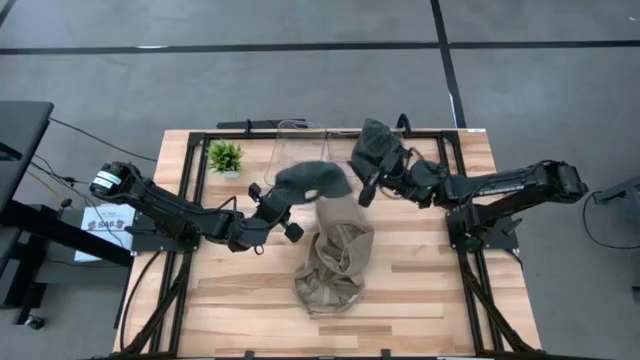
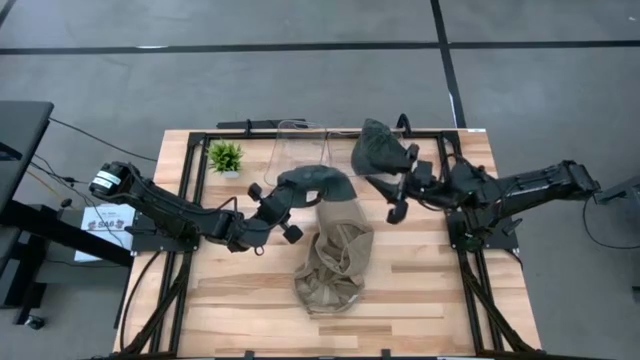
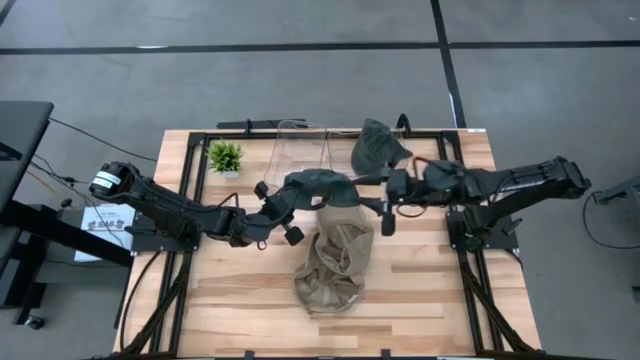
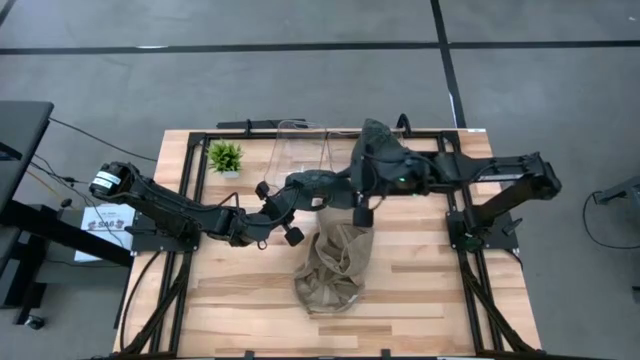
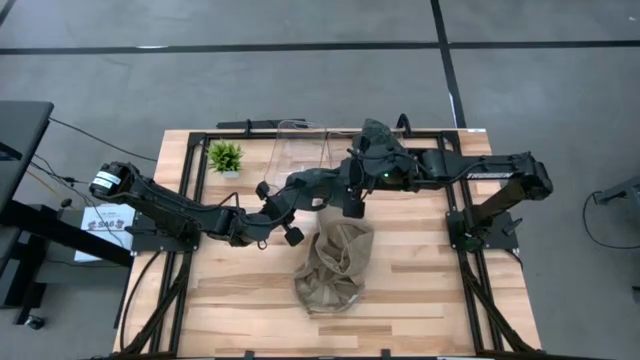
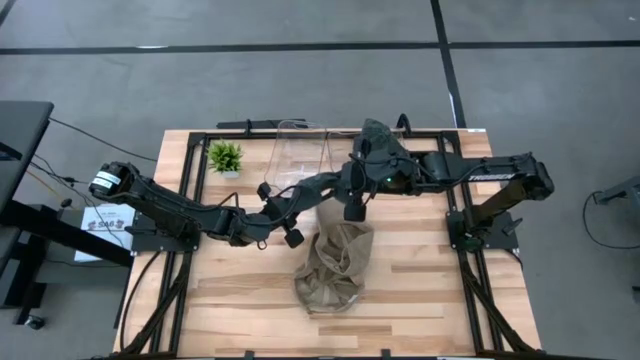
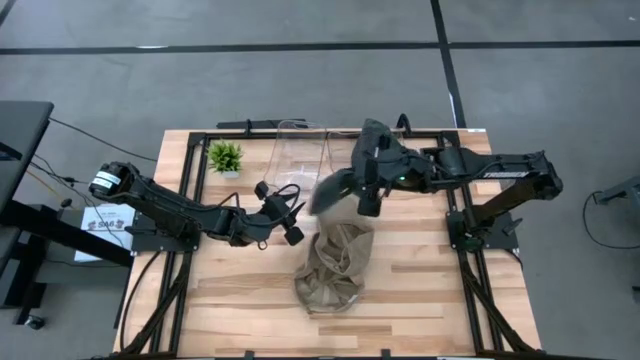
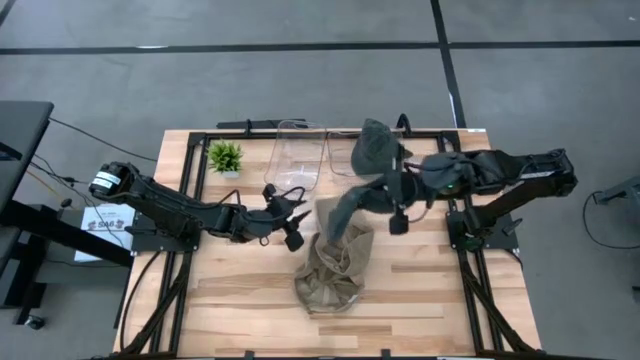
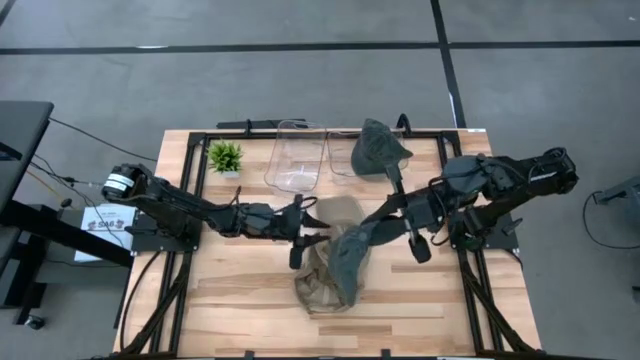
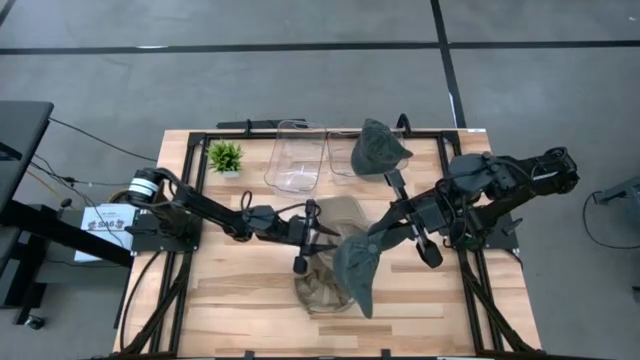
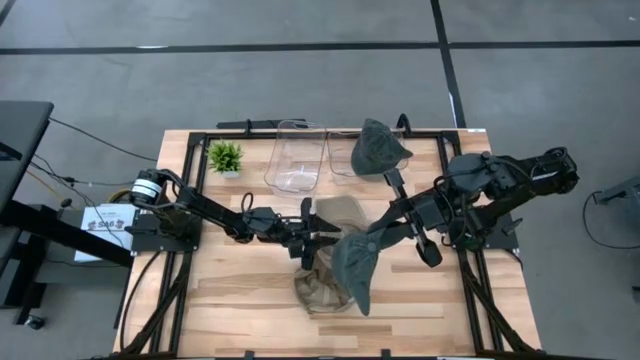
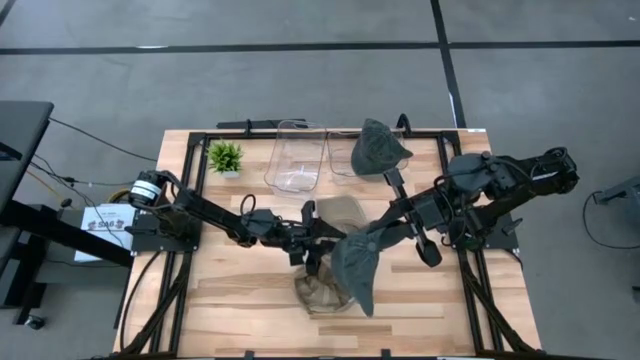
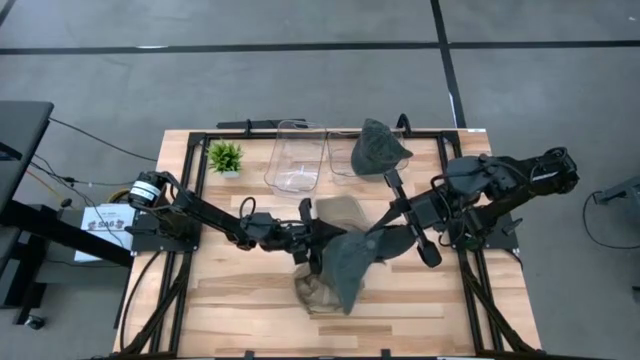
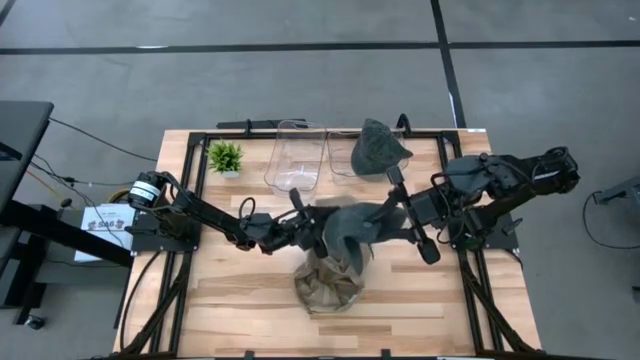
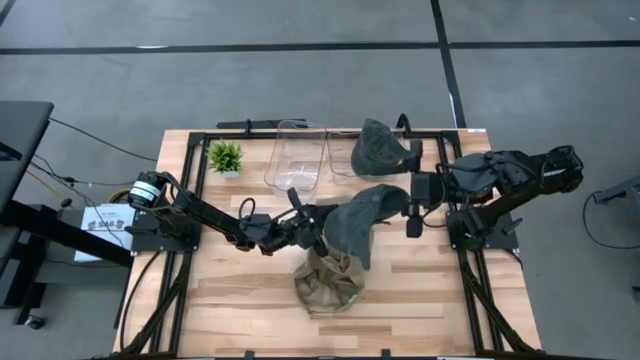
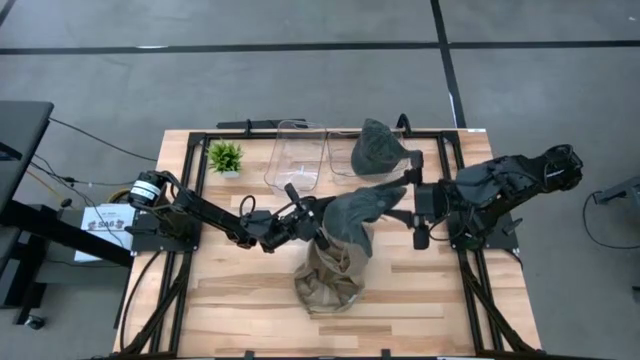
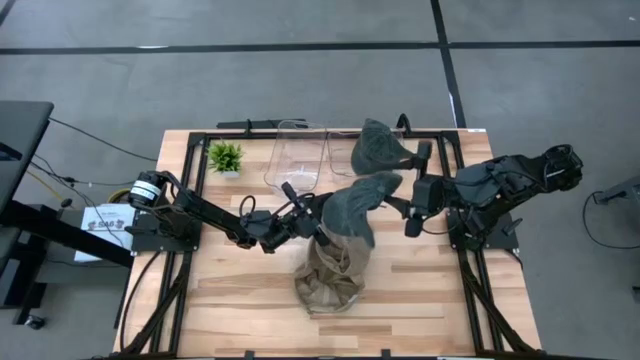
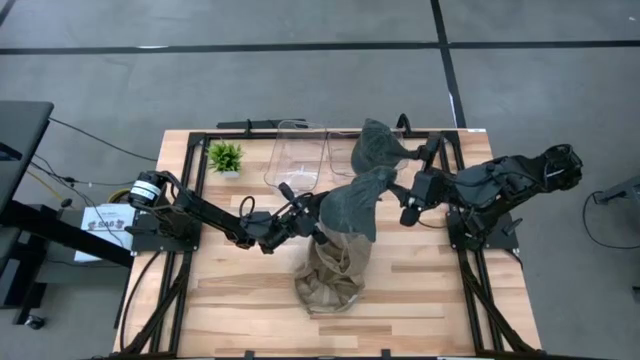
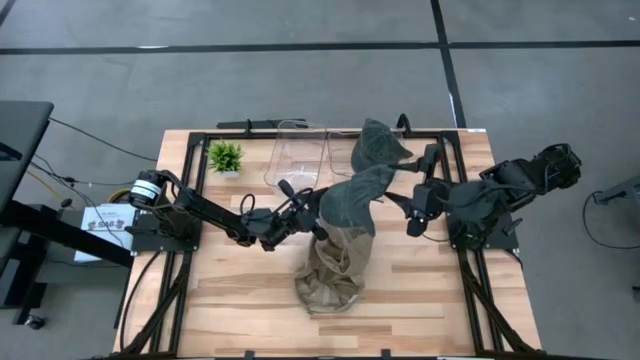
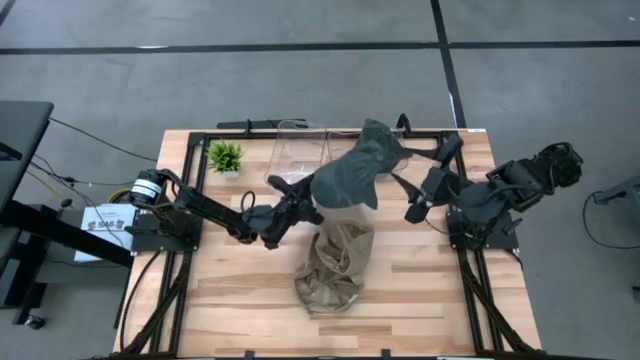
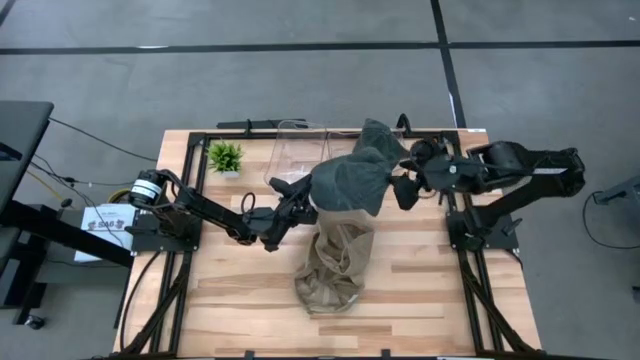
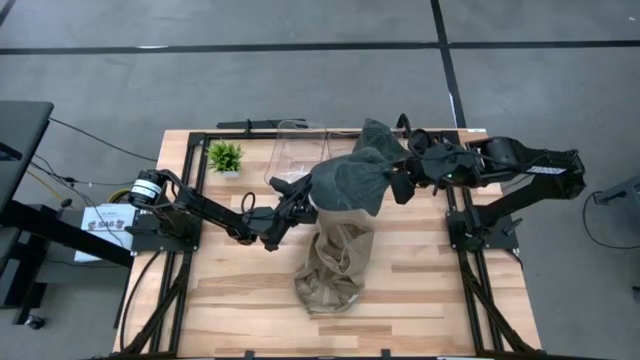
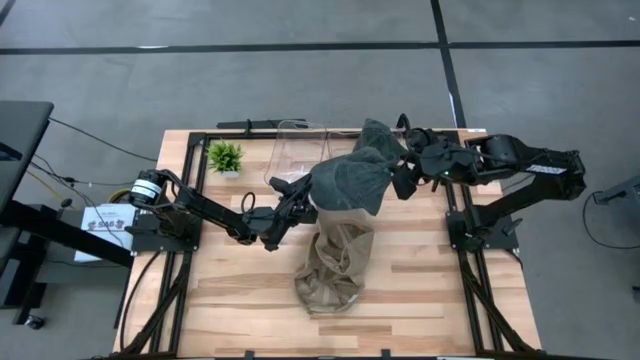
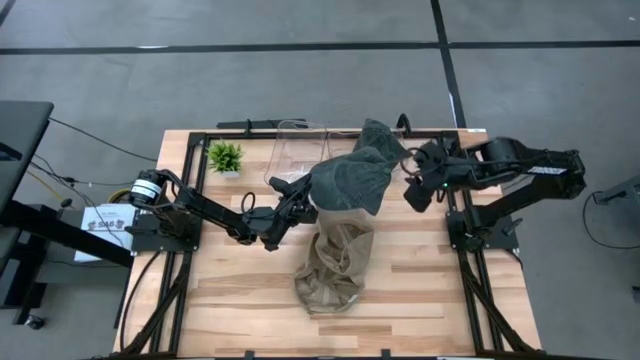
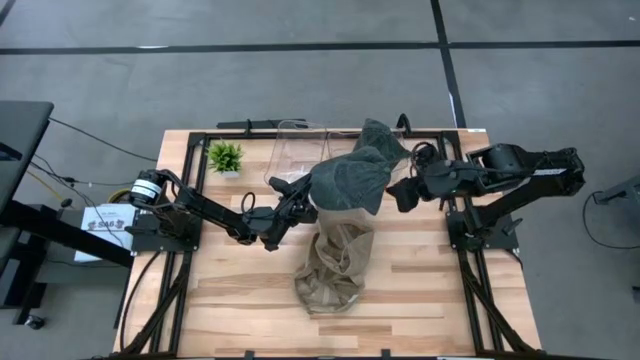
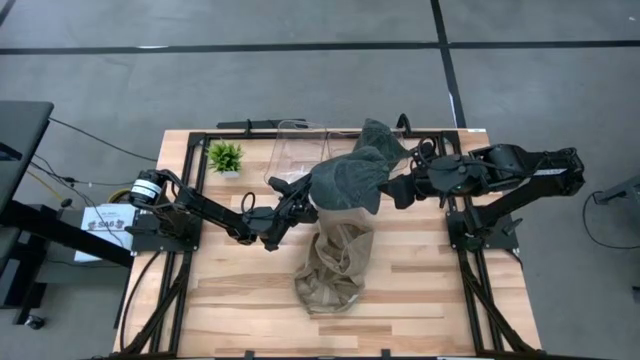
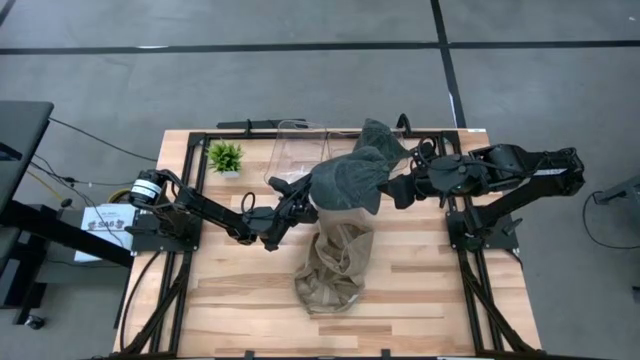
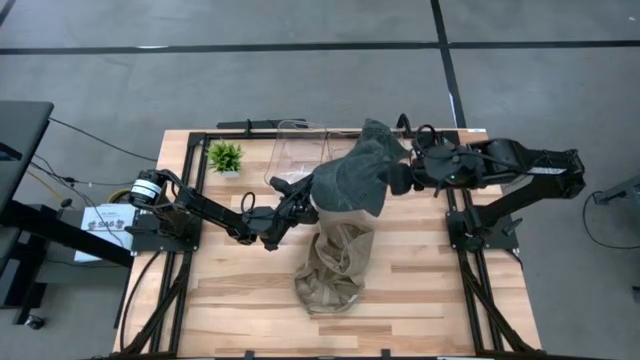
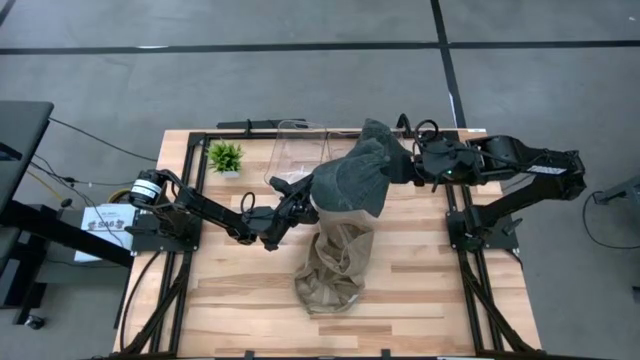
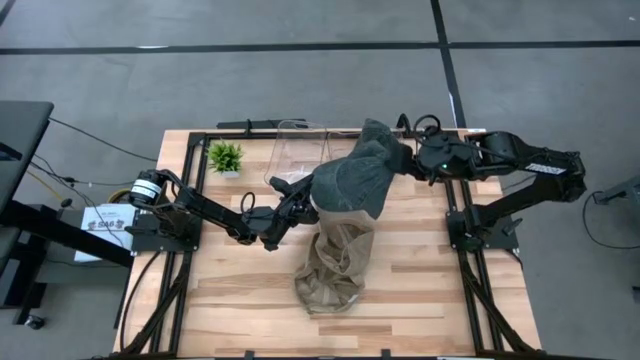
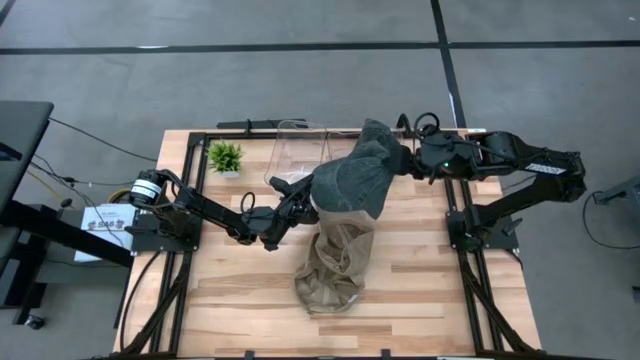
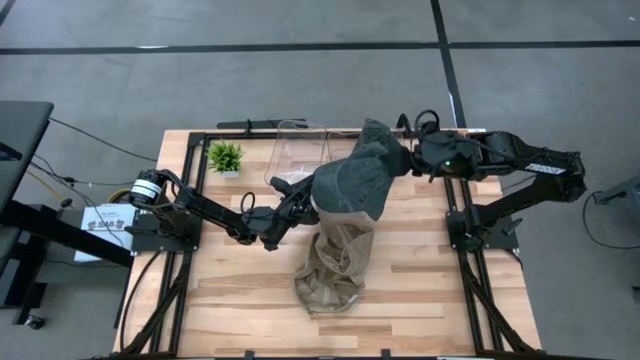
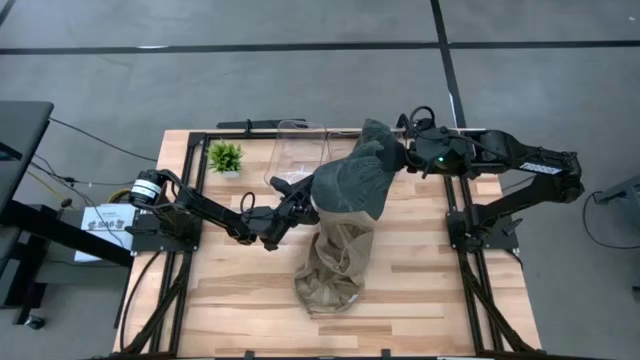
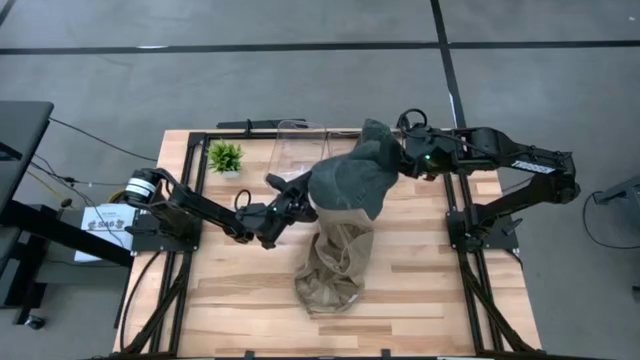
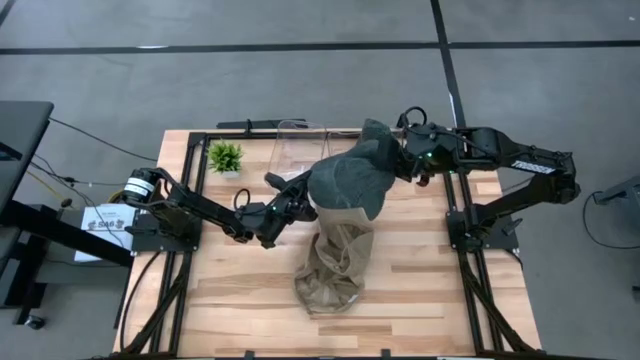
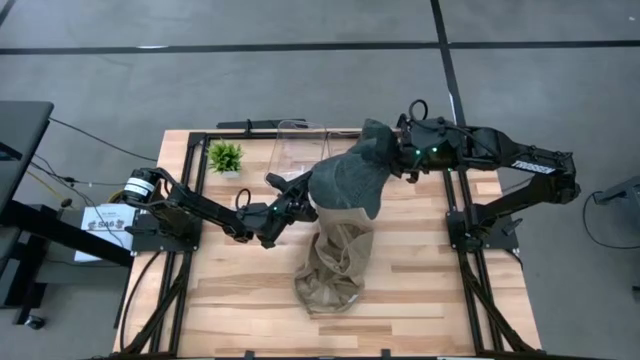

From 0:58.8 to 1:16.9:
Task: Pick & Place hat
Put the black cap into the right transparent bin
